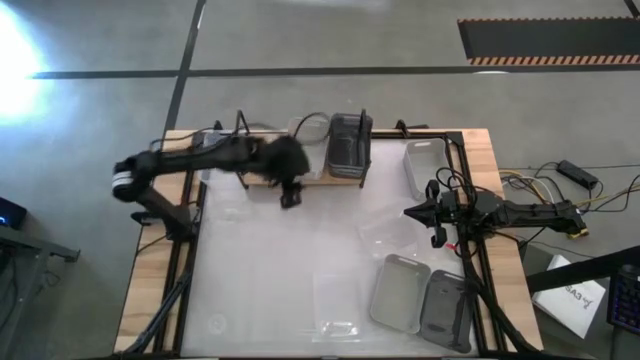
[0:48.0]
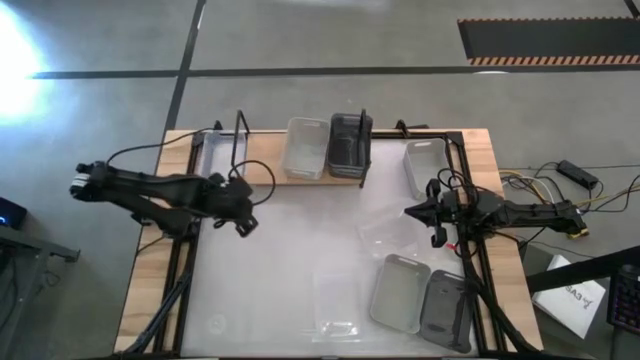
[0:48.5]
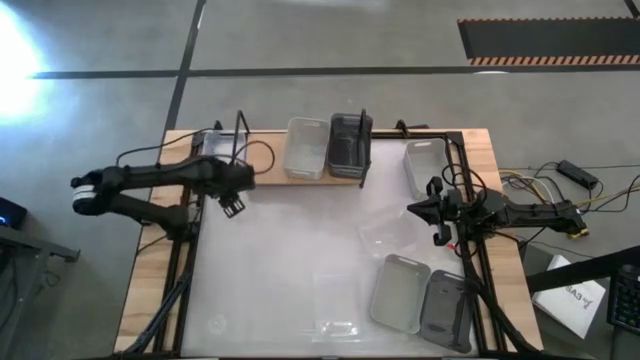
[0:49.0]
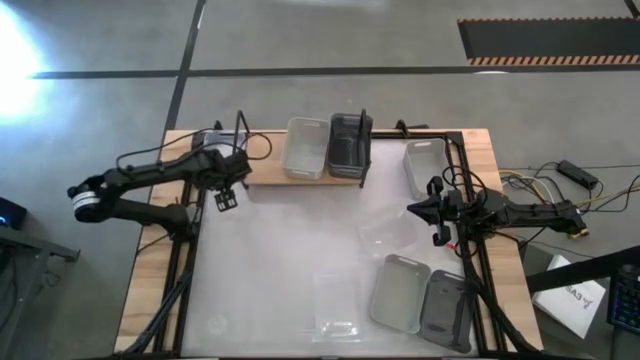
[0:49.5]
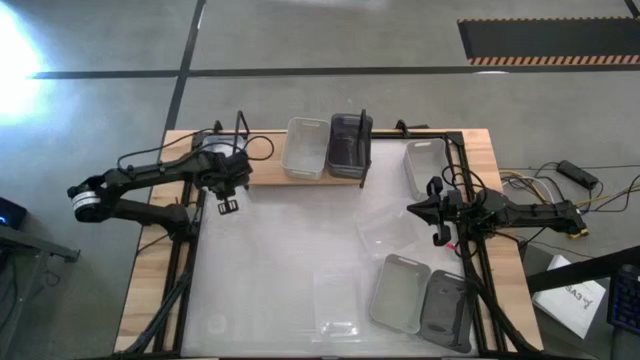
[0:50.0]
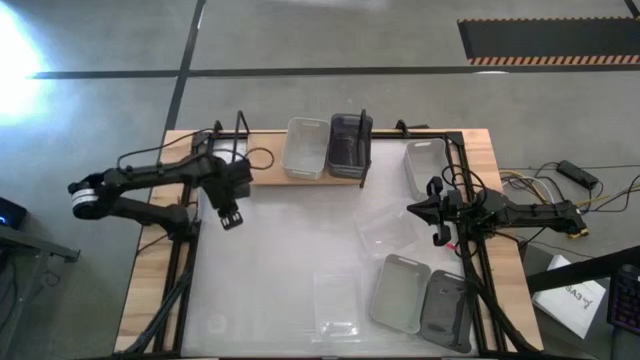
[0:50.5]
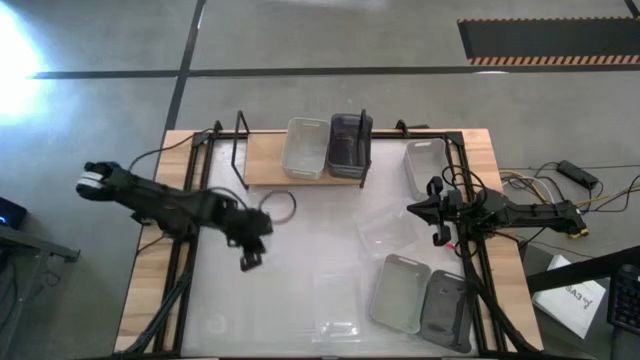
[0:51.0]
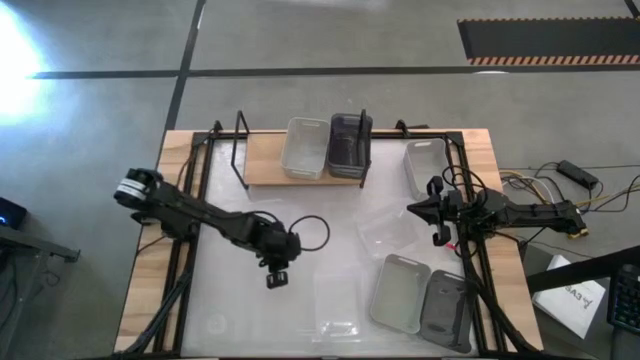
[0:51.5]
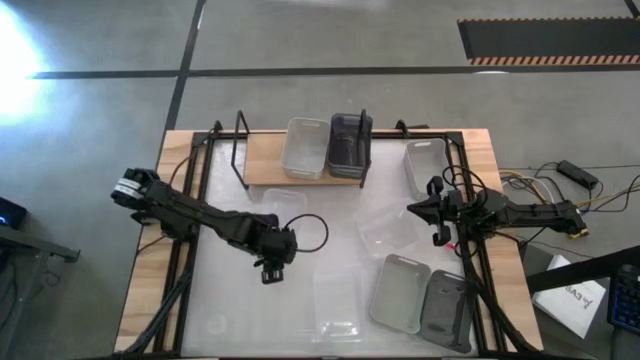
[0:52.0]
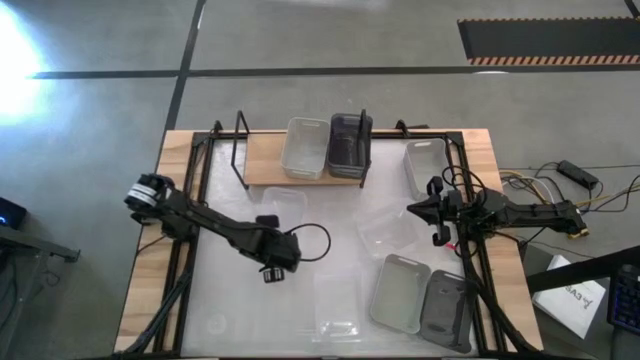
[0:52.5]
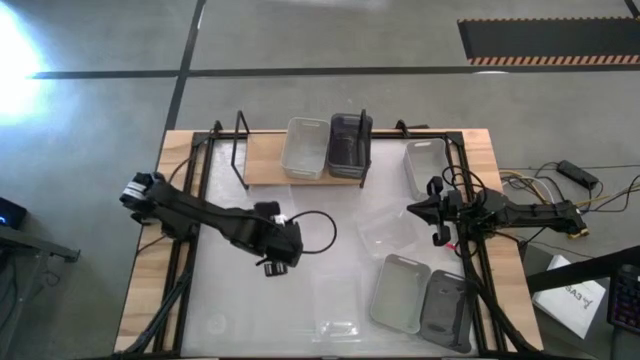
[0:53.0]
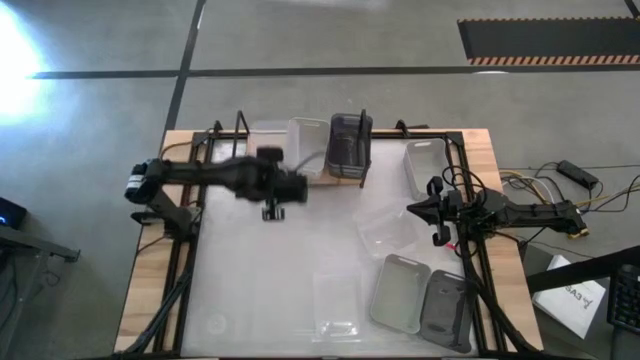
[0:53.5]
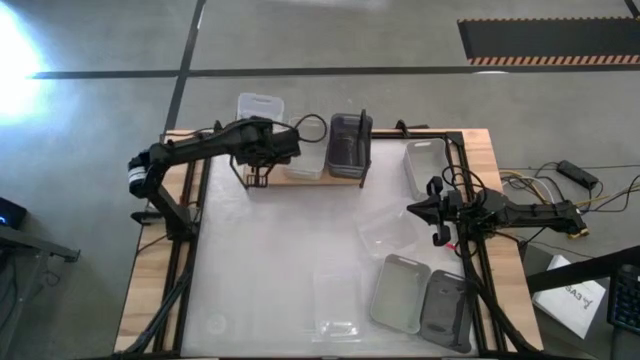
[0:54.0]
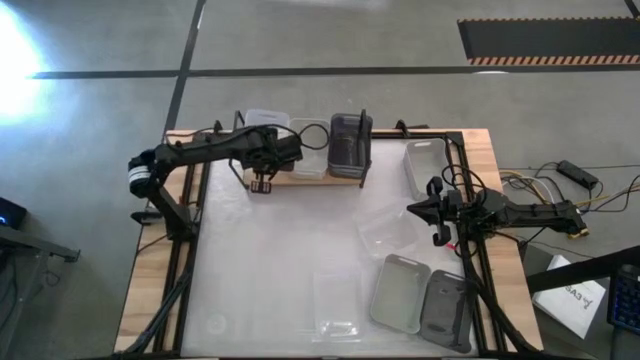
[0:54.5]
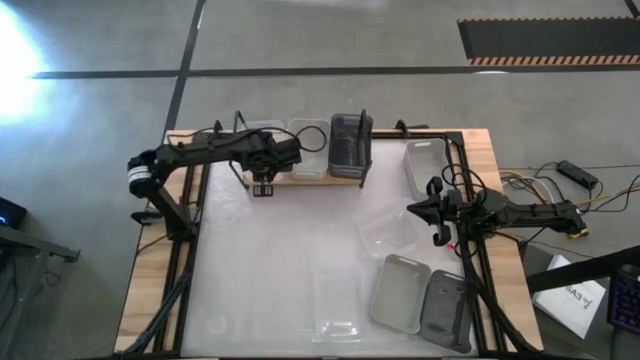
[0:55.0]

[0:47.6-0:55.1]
Task: Stack baskets on shelf by color
Put the top transparent bin on the shelf

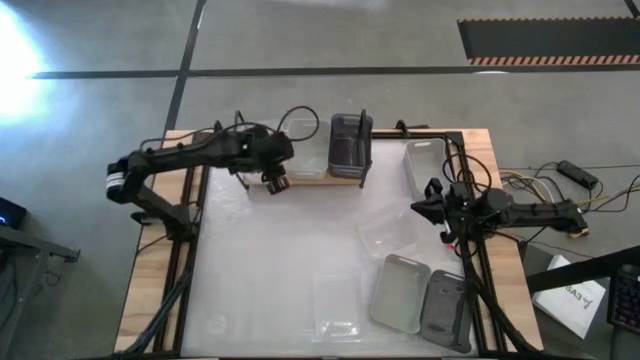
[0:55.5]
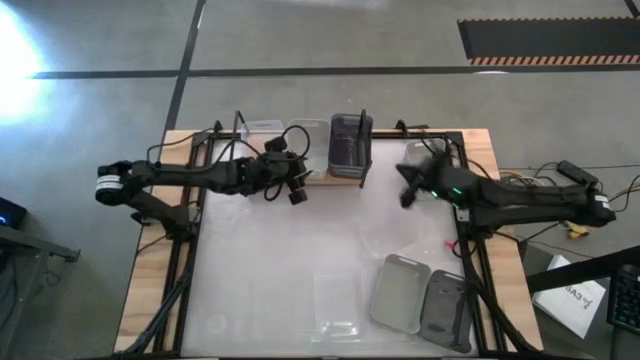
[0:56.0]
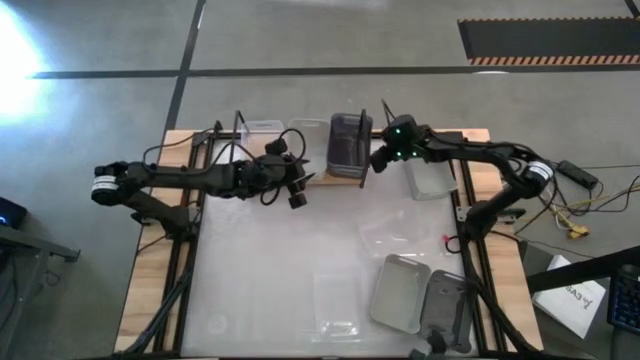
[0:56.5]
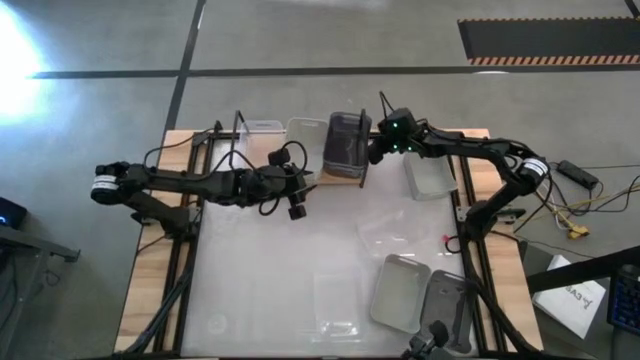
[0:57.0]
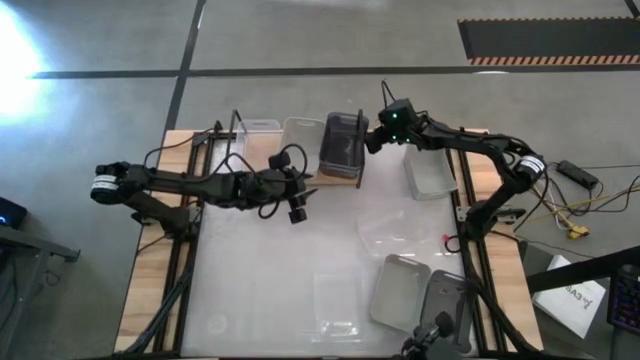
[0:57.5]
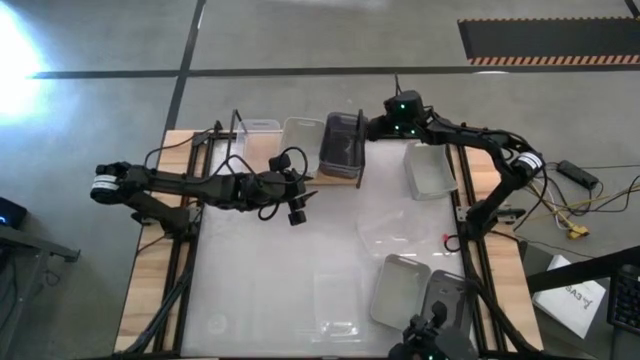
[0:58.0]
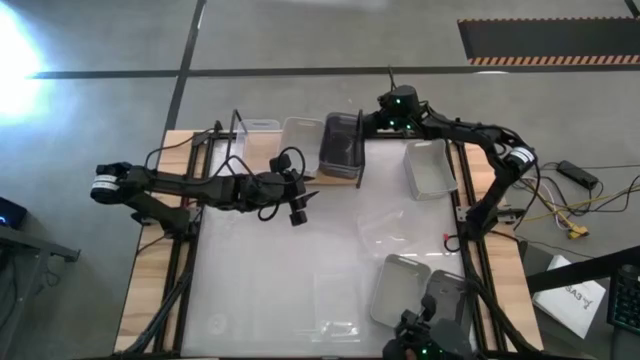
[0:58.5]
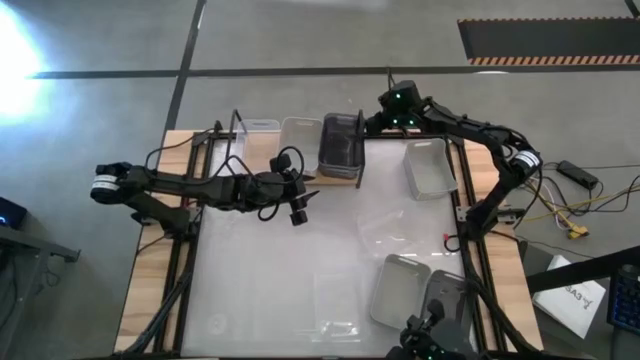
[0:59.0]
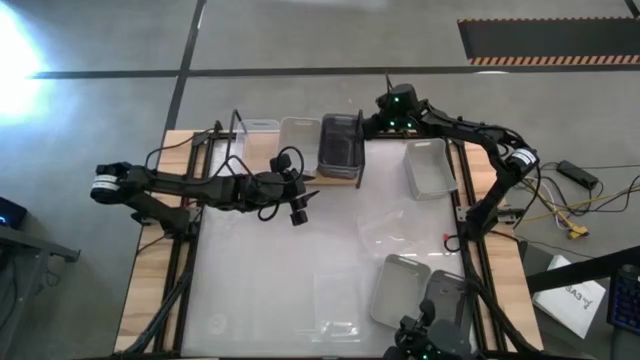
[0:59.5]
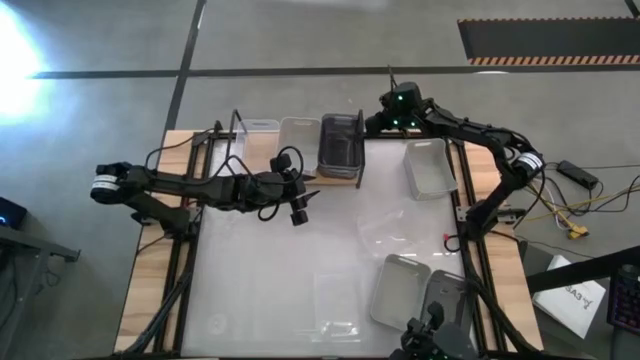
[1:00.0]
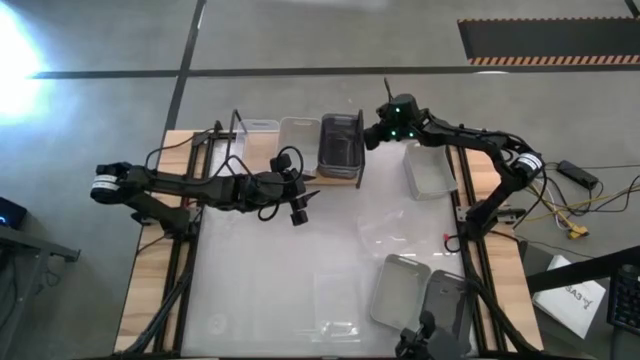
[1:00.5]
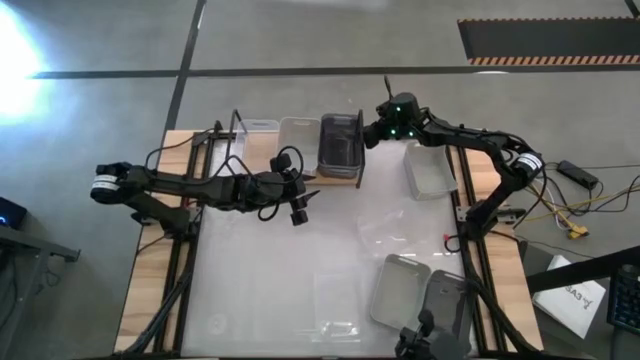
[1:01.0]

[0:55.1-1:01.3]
Adjust the stacked black bins on the shelf

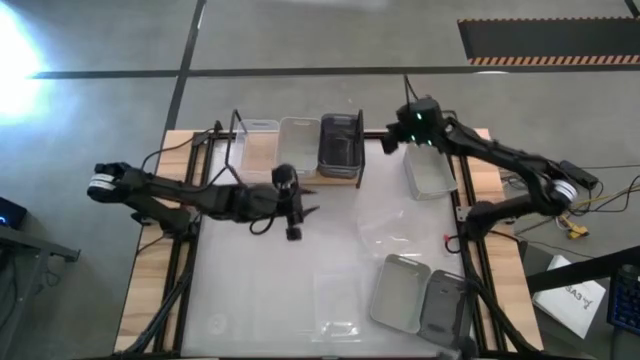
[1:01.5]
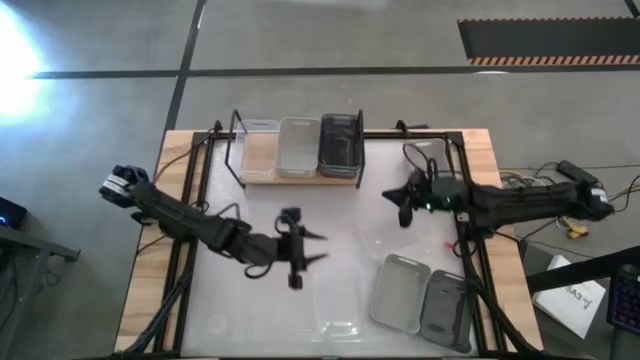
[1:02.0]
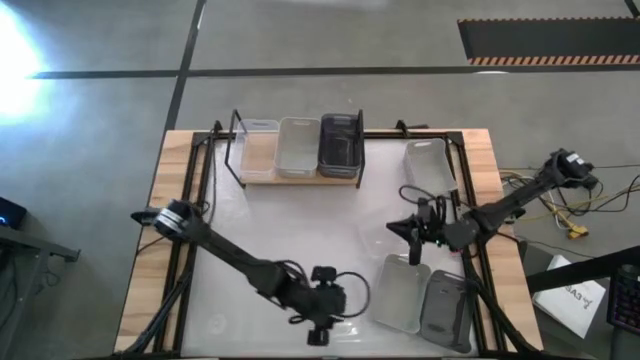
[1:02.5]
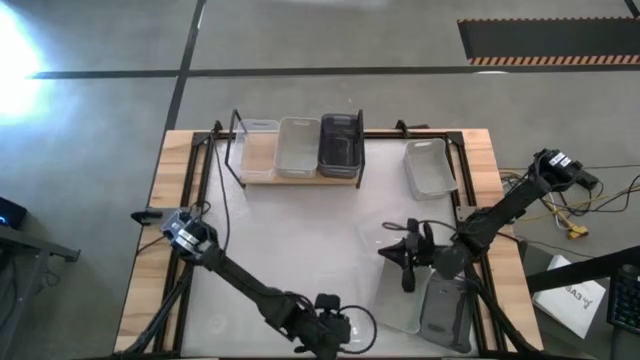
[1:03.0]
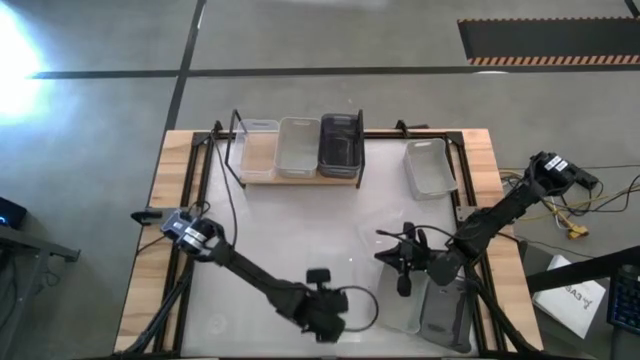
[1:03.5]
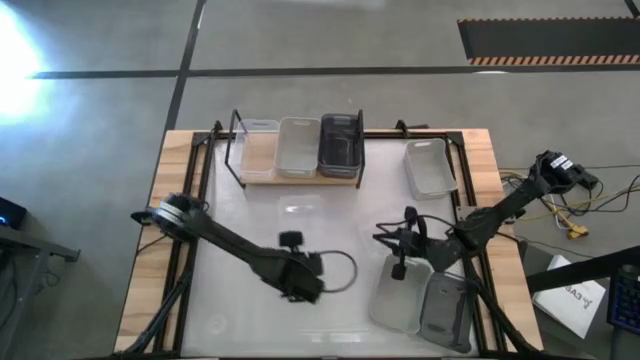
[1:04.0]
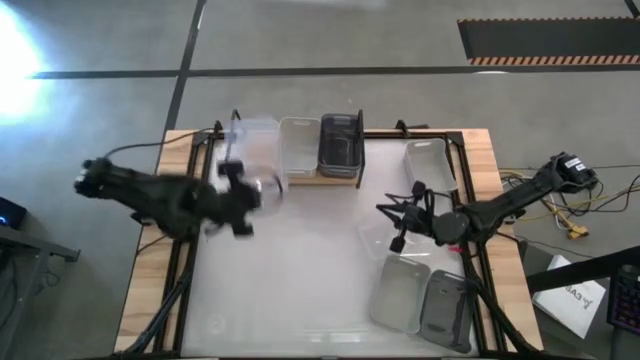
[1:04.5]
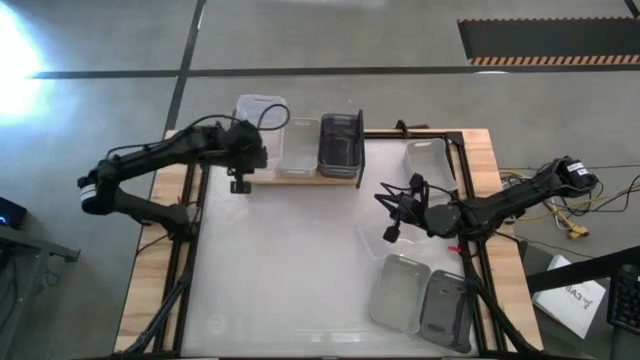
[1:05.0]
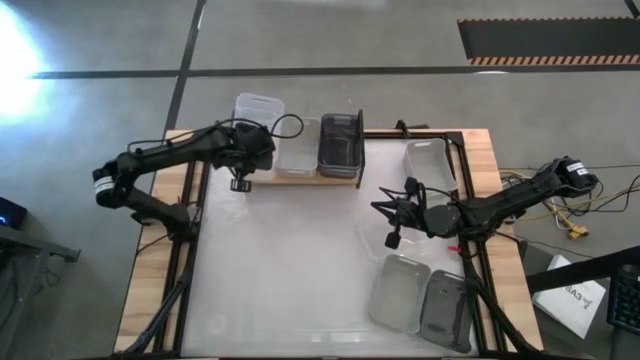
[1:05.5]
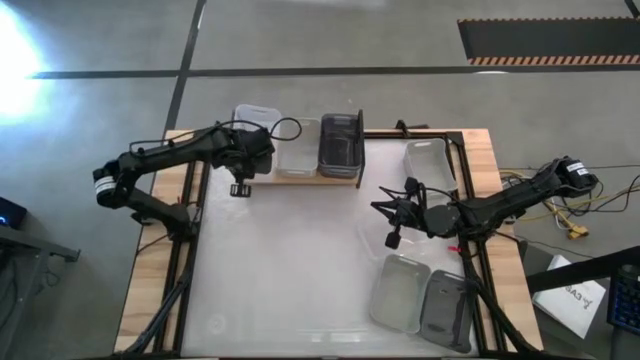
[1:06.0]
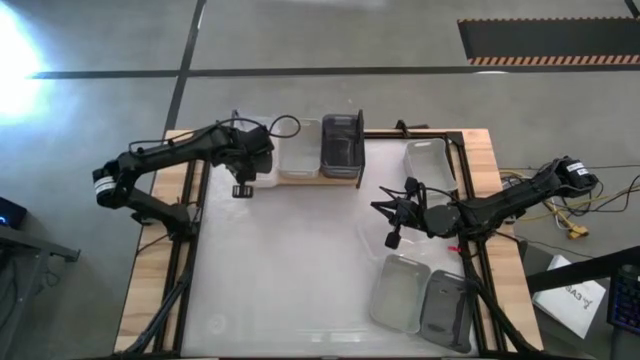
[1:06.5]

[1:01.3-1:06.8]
Stack the bottom transparent bin on top of the transparent bin on the shelf

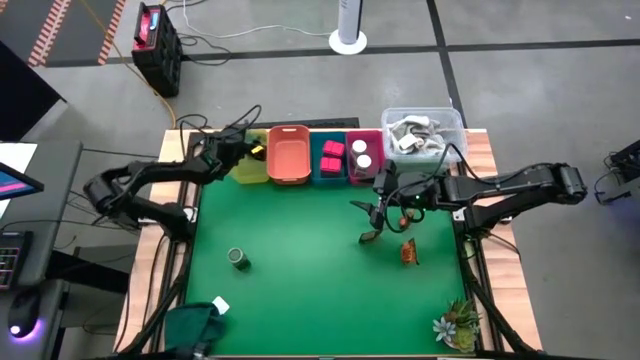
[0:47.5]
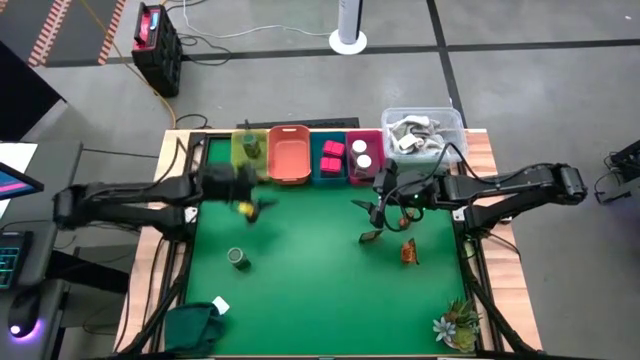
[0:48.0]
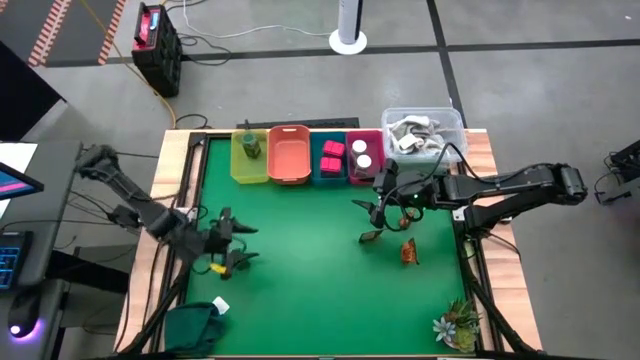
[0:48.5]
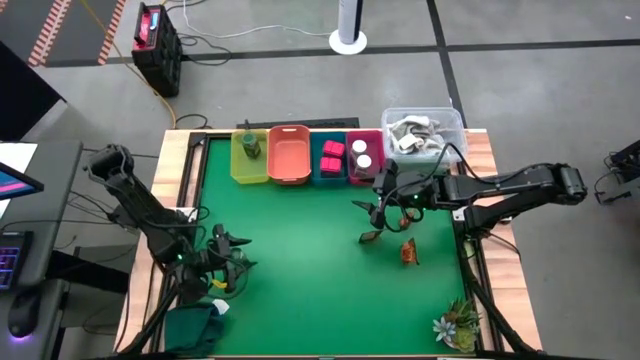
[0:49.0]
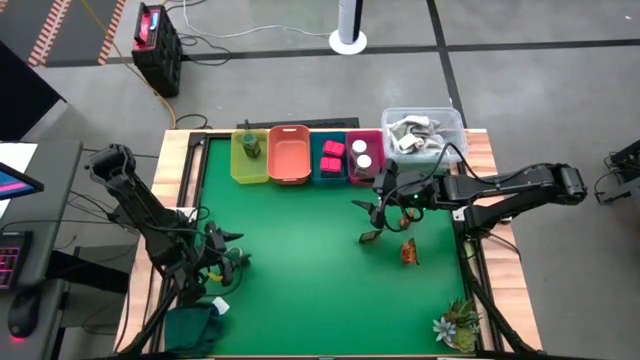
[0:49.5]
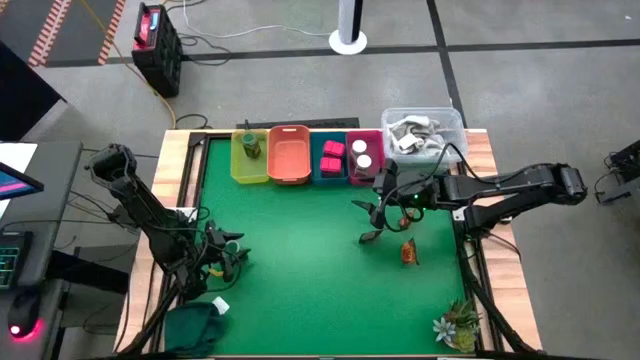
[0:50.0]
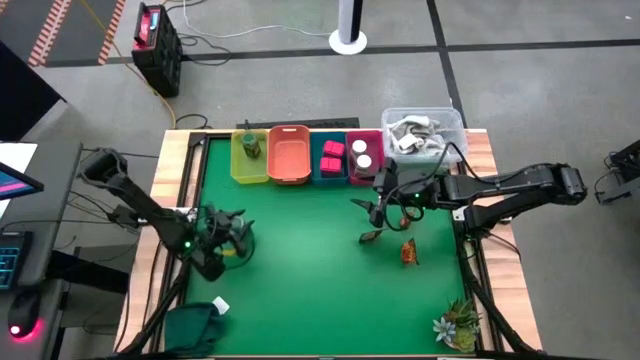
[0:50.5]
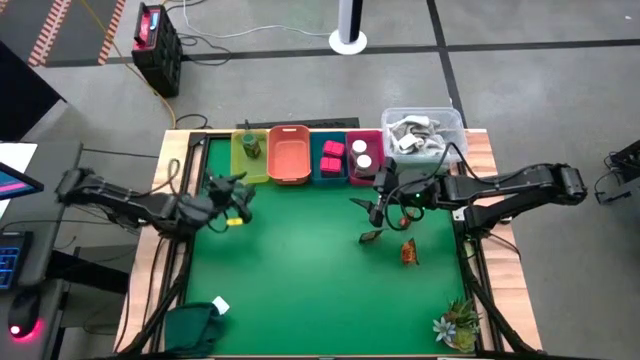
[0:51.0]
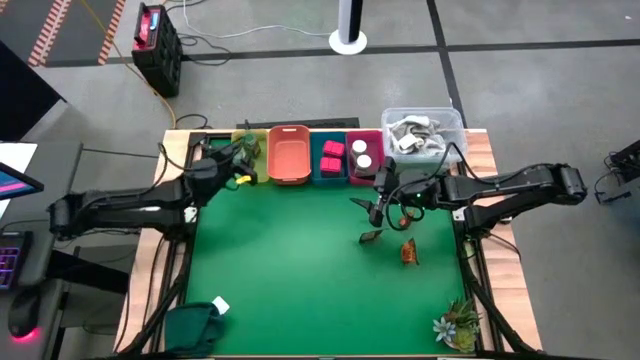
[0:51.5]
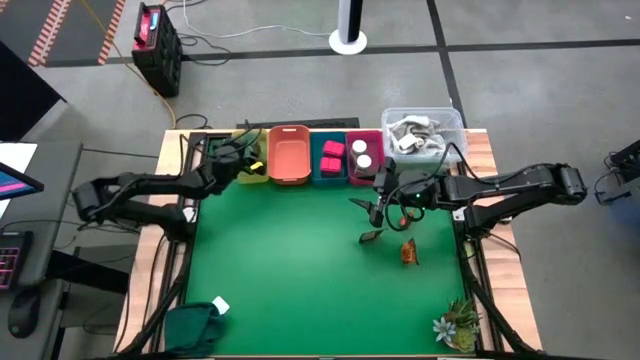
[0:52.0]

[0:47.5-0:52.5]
Task: Sort spices by type
Put the green seasoning bottle into the yellow bin
